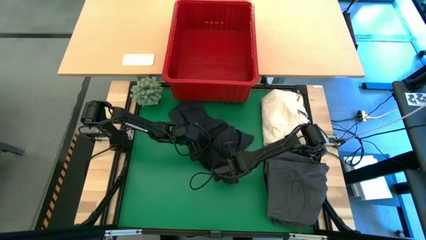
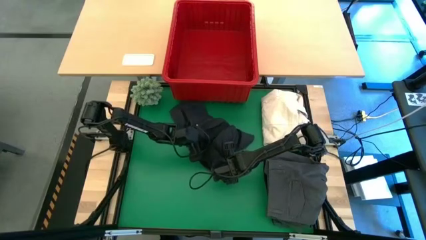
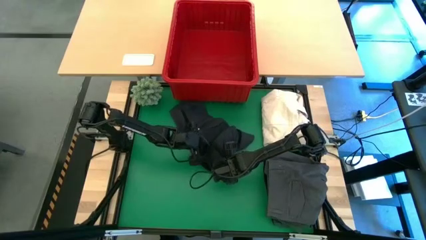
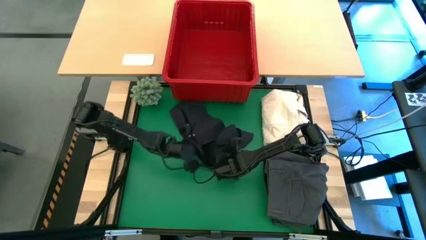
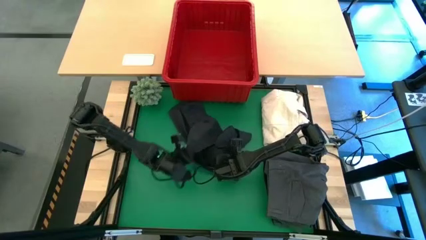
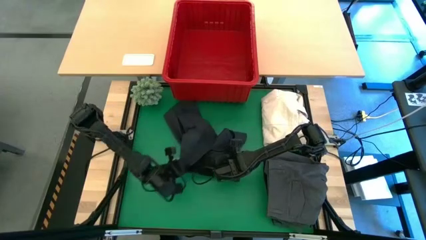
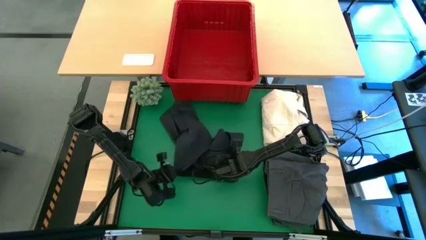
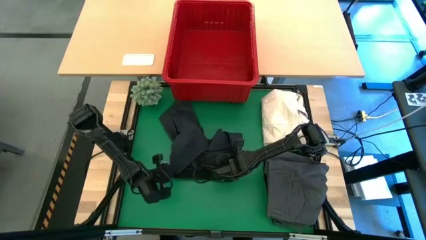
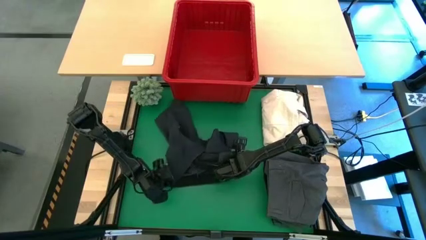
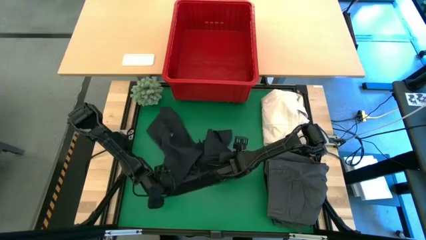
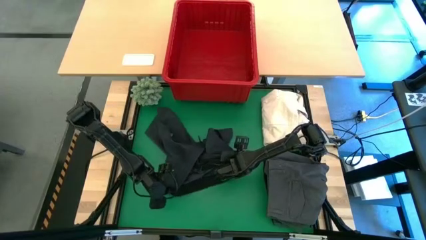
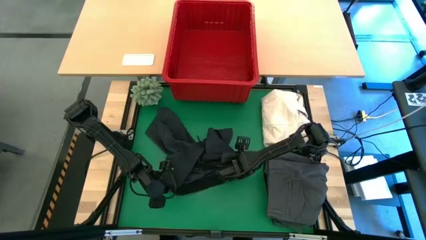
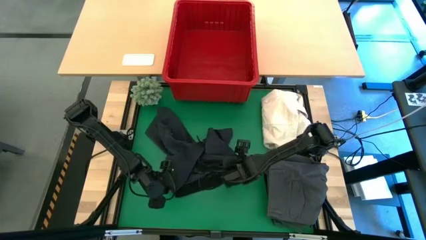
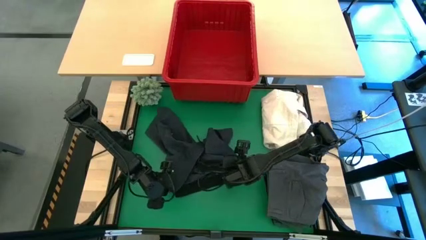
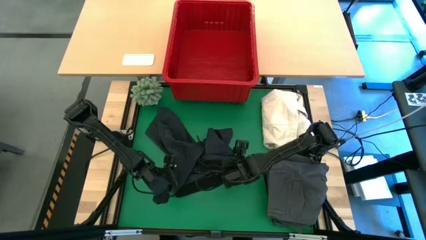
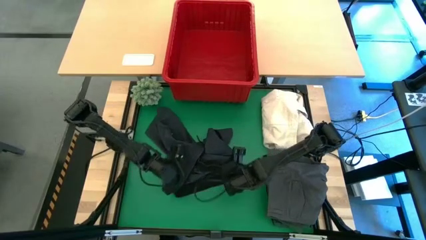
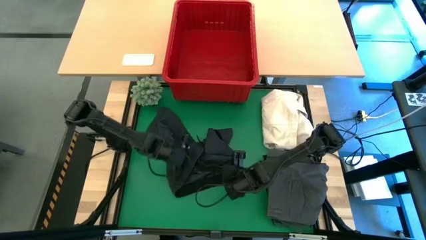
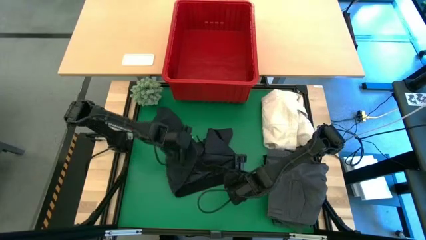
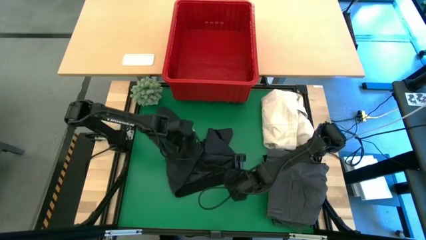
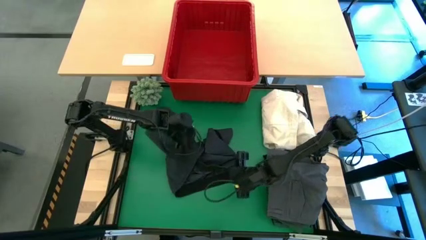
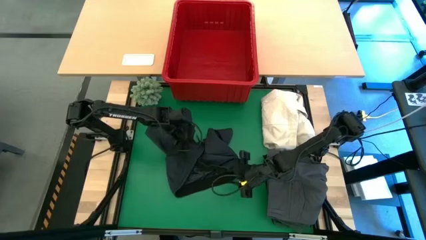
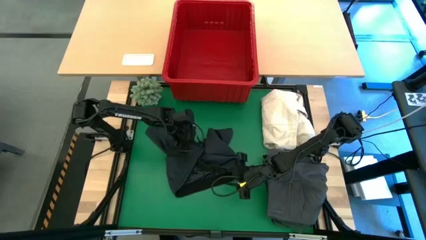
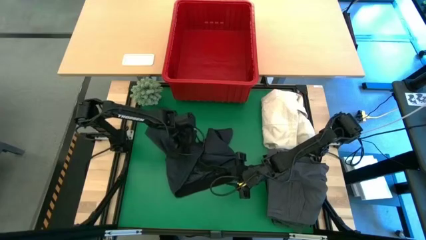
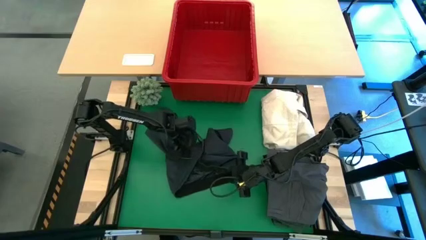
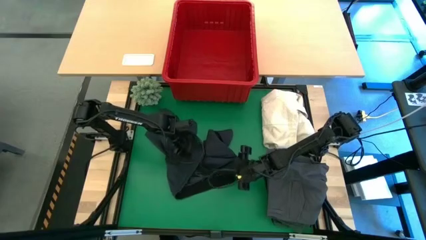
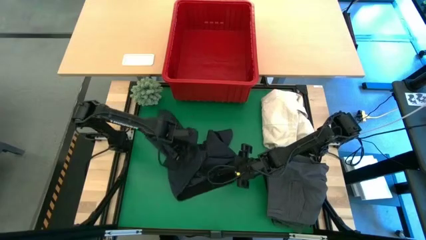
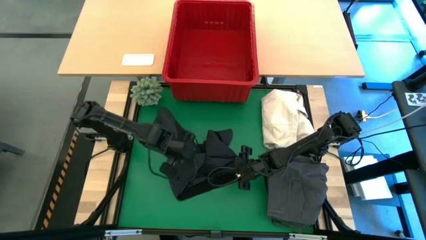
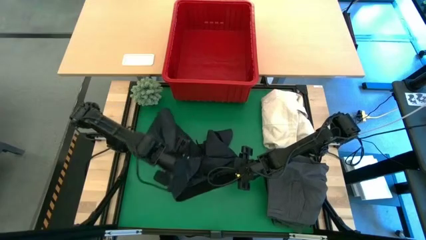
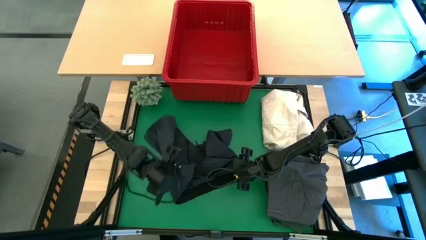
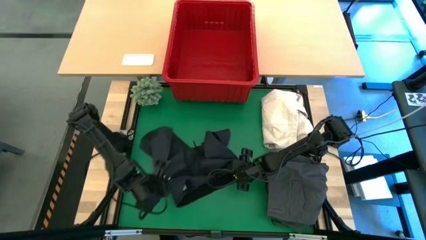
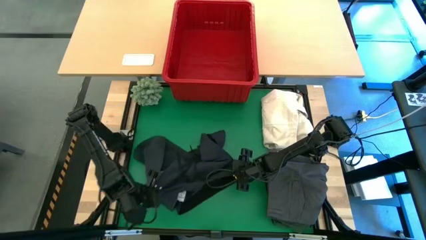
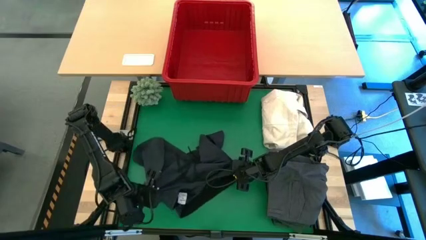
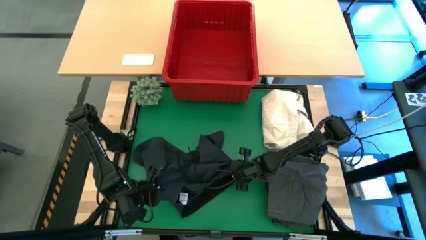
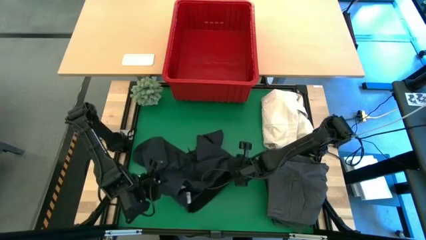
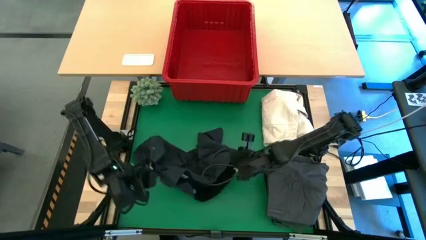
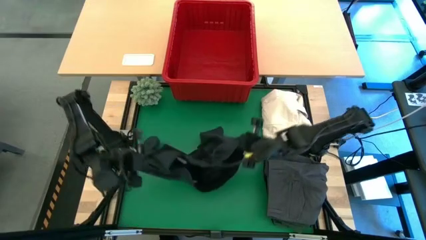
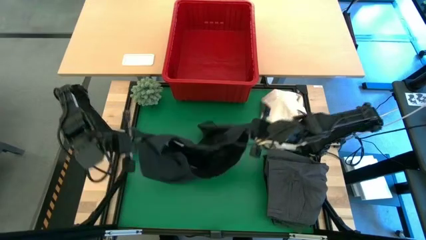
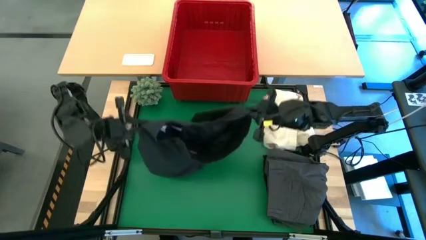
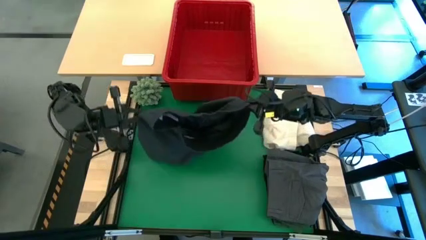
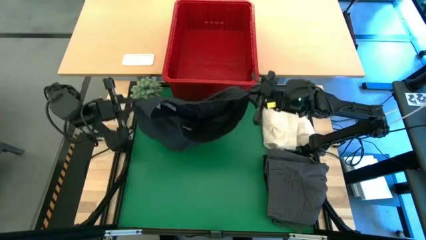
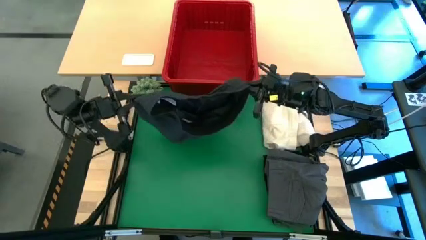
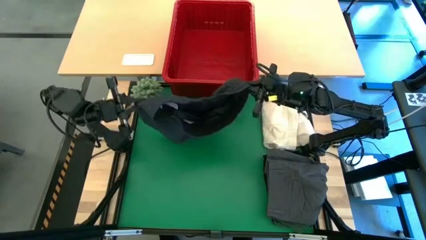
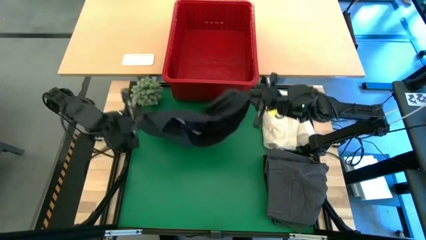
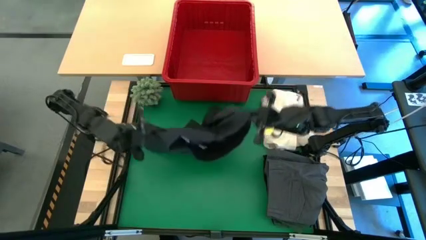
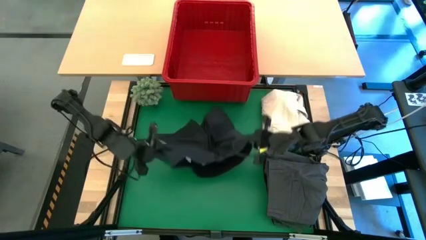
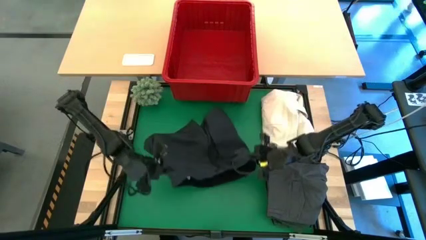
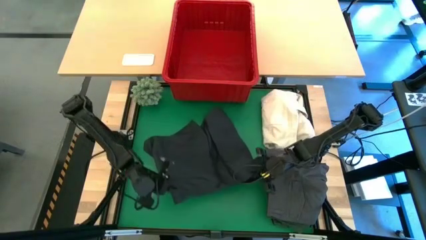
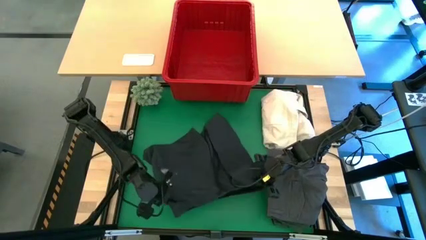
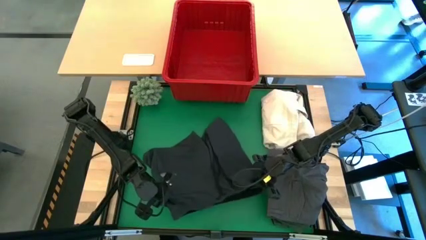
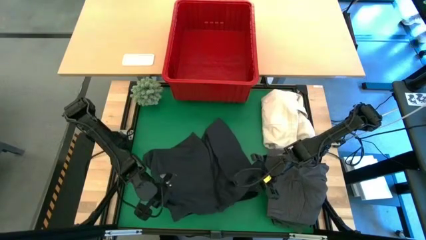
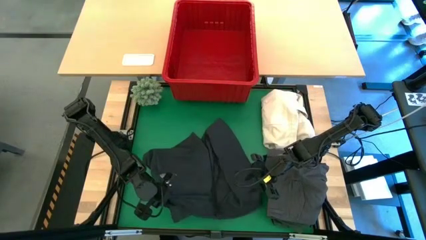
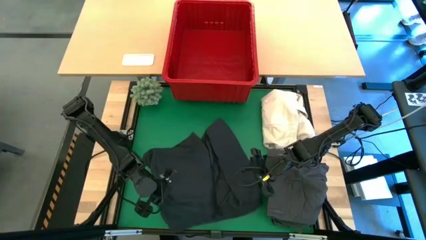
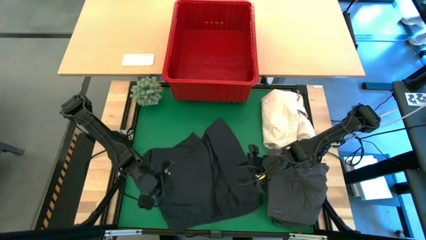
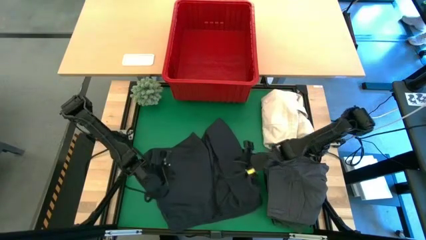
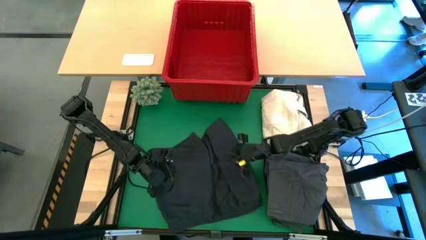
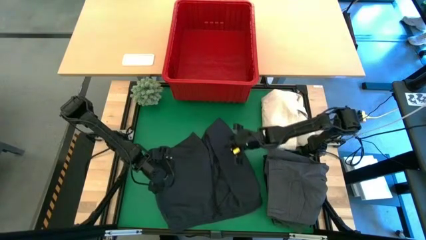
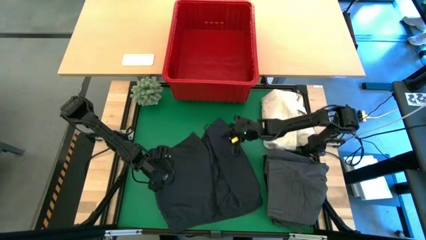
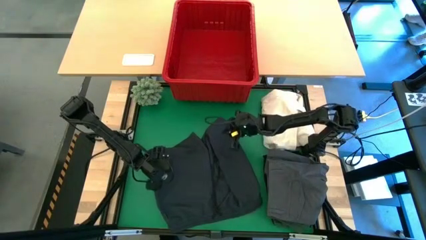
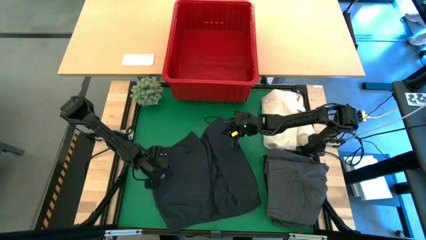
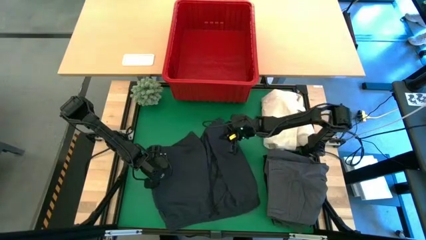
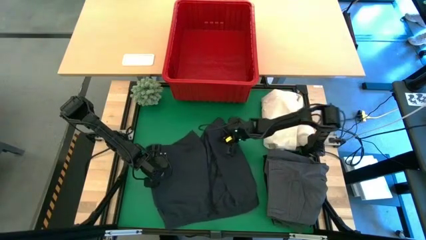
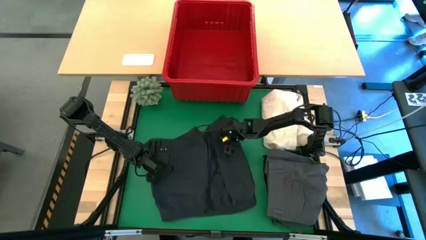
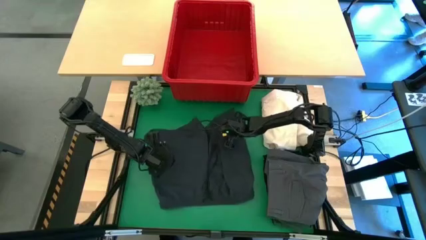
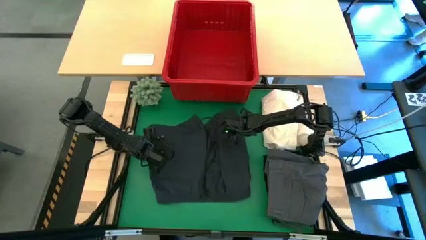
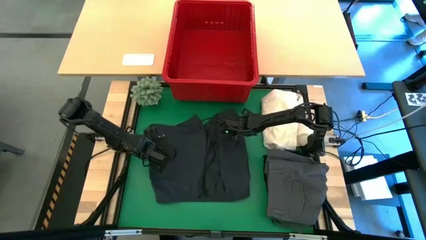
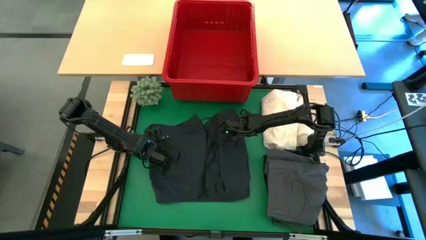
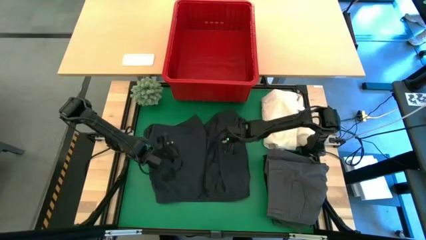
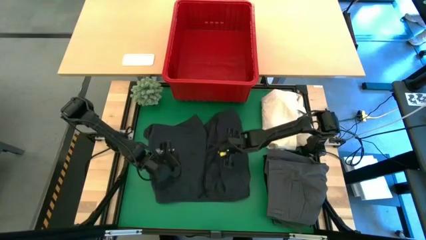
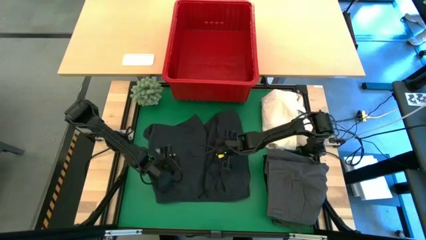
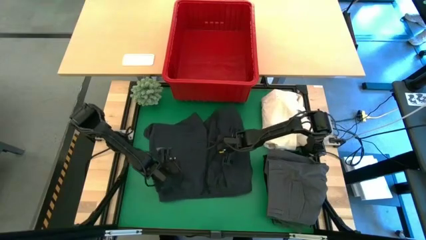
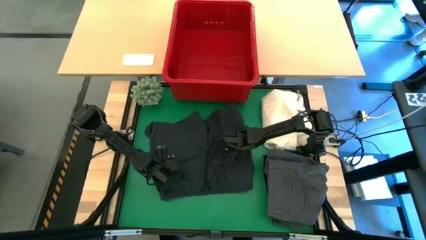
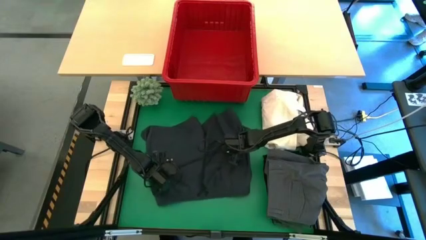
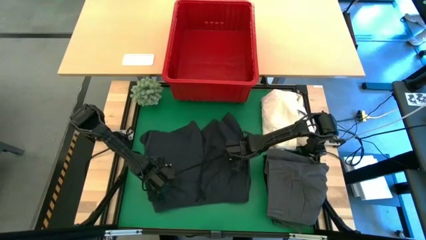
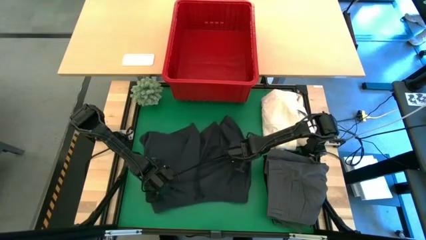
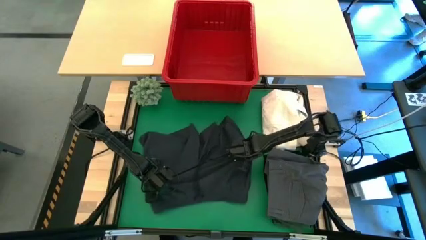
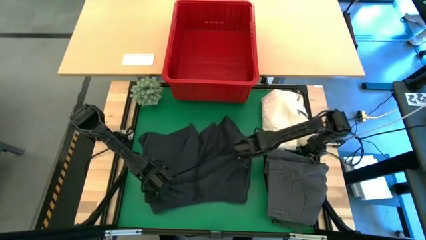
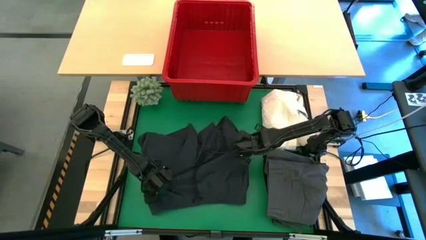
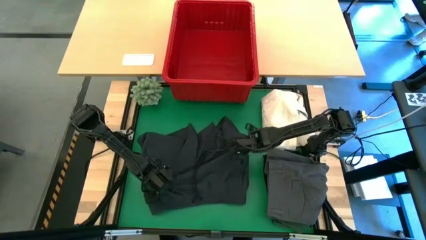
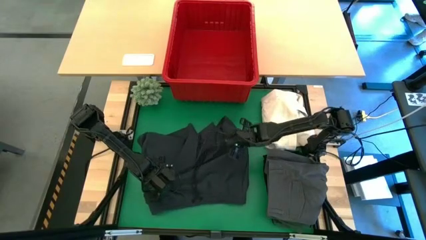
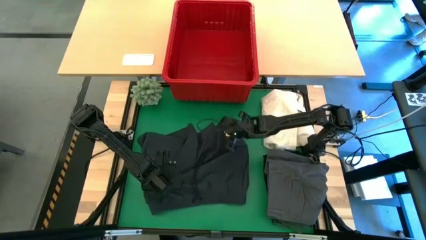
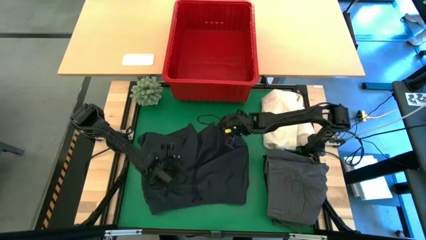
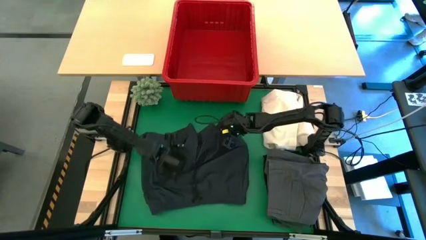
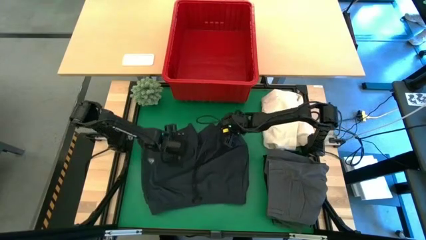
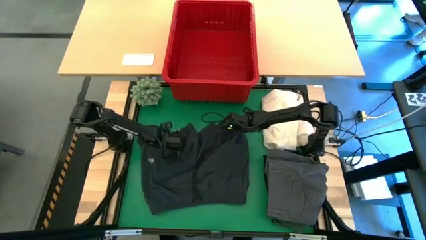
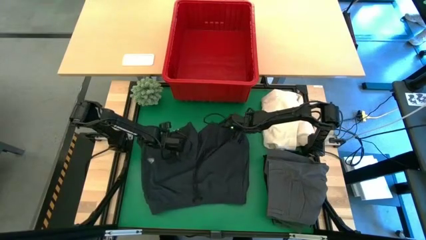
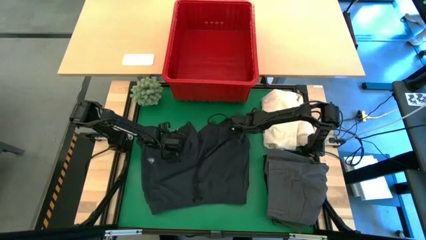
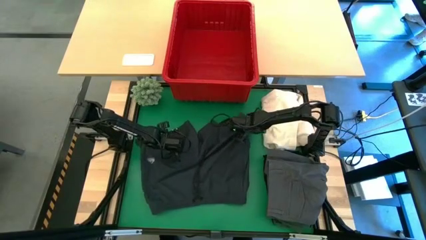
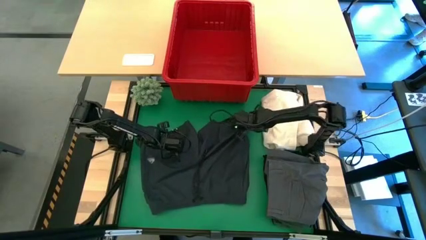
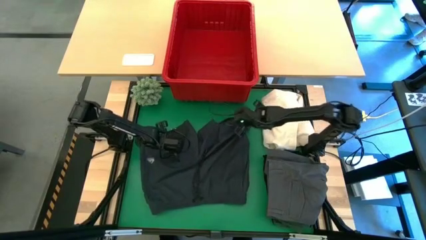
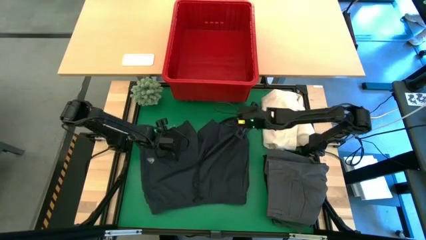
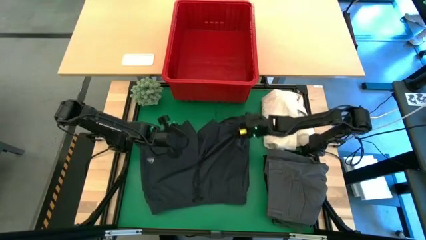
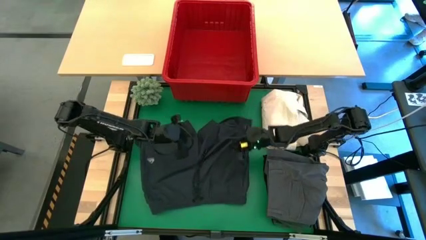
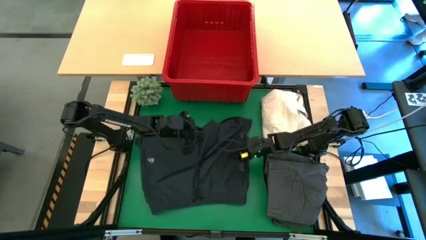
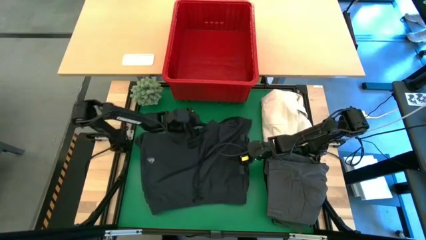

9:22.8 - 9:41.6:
Task: Fold laundry
Fold the gray short
